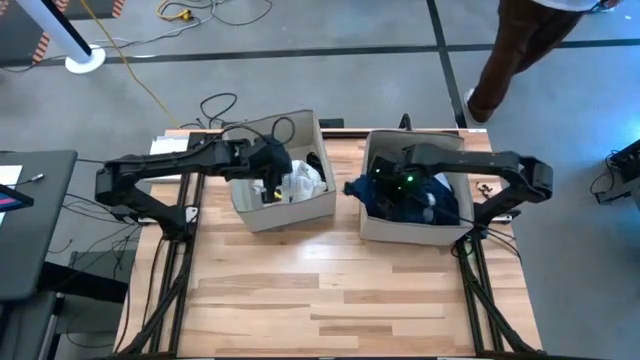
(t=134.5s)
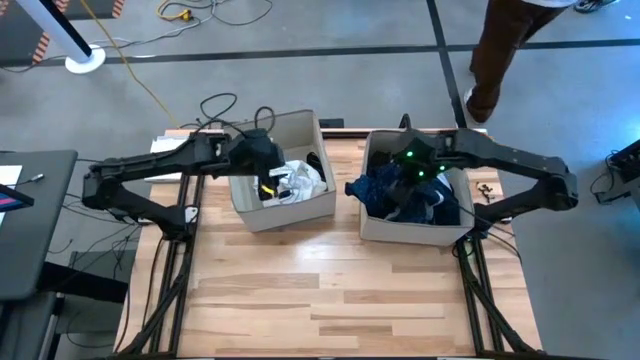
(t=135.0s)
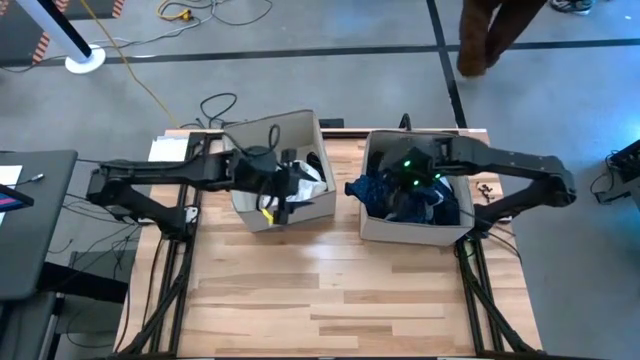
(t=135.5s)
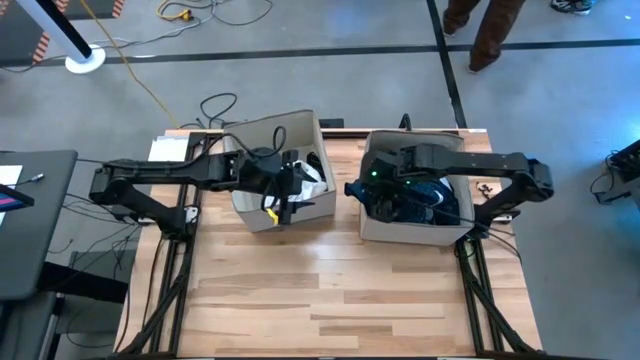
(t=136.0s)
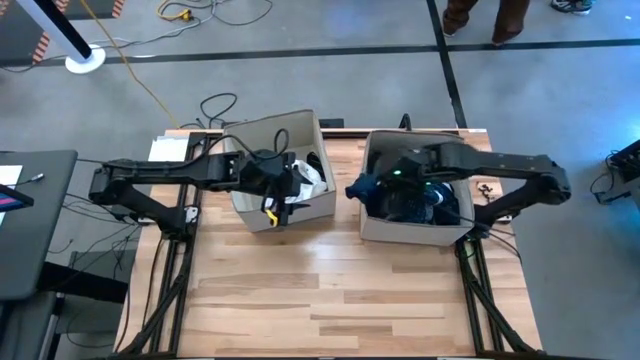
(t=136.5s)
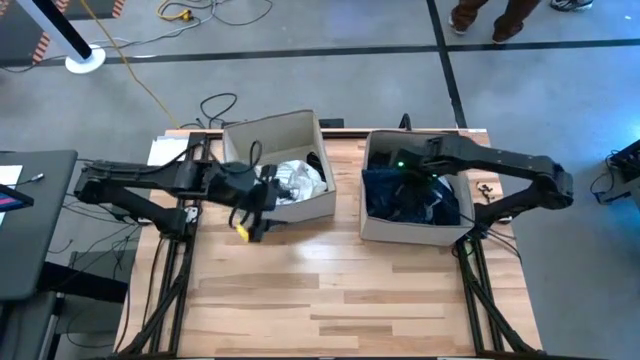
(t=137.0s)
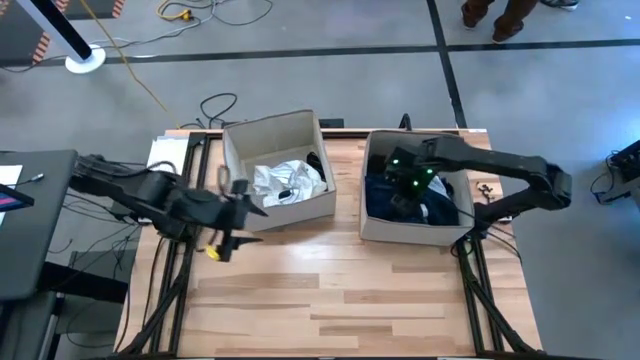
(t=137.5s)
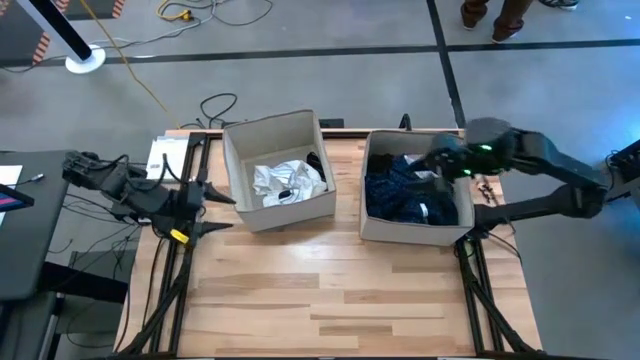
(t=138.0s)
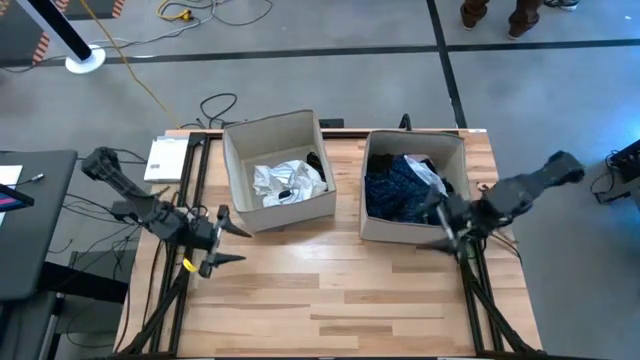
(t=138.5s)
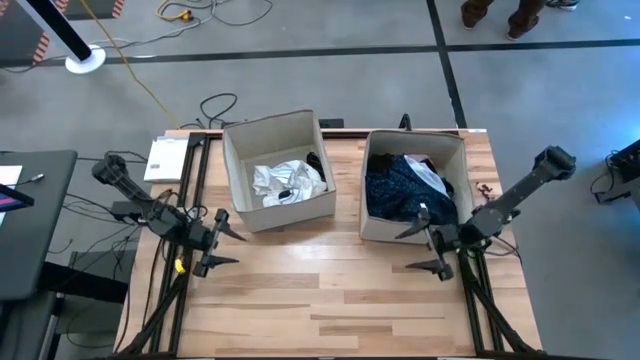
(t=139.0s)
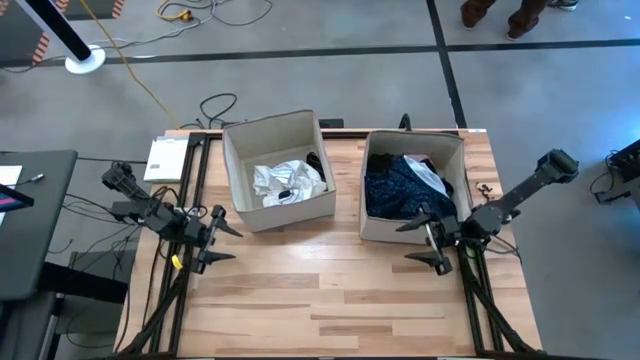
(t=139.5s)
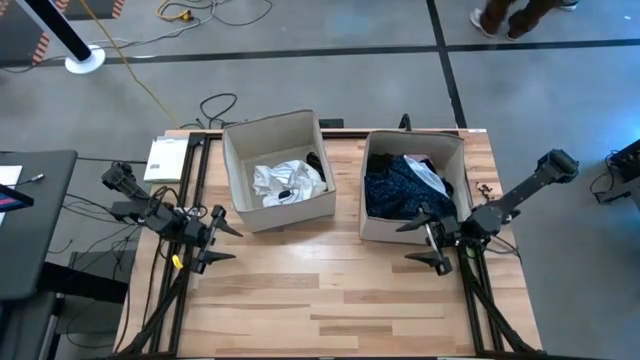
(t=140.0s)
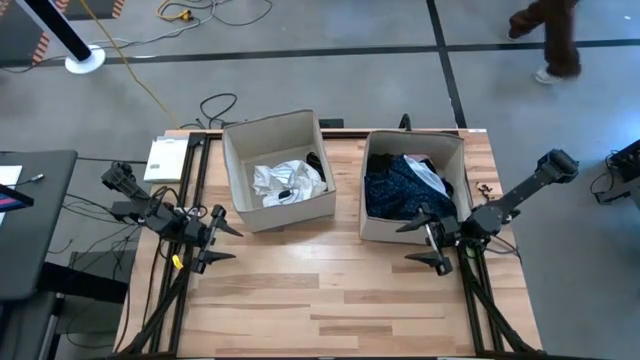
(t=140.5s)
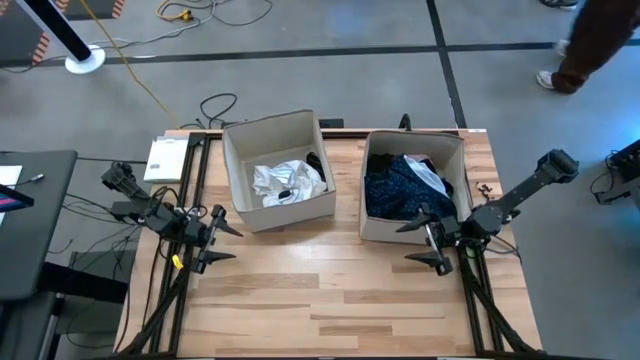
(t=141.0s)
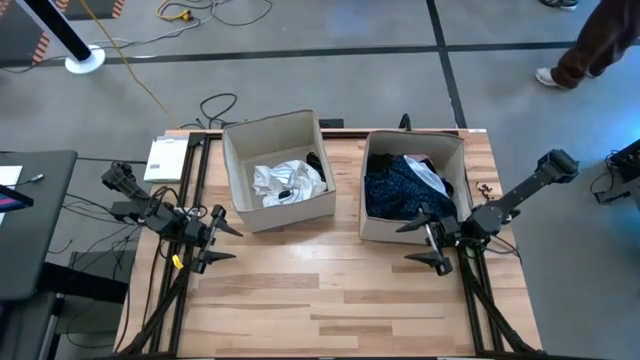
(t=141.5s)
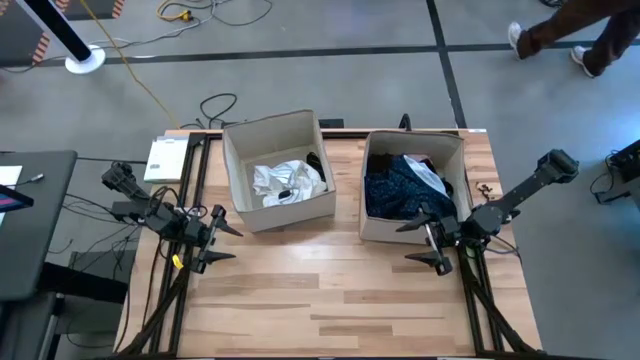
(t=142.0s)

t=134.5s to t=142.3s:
Task: Sort clothes
Return to Home Position

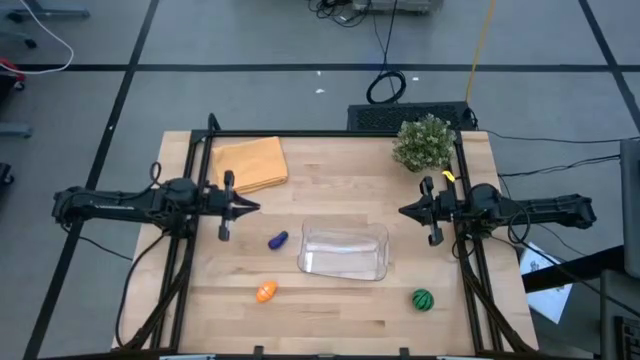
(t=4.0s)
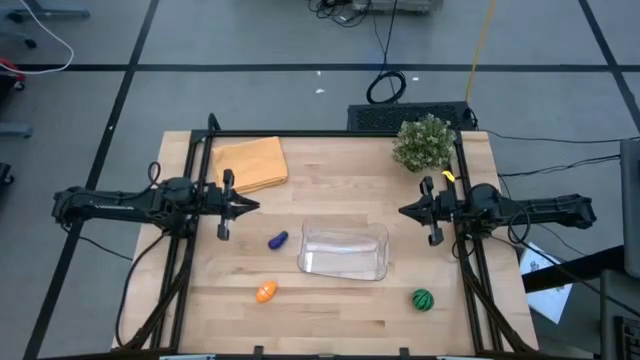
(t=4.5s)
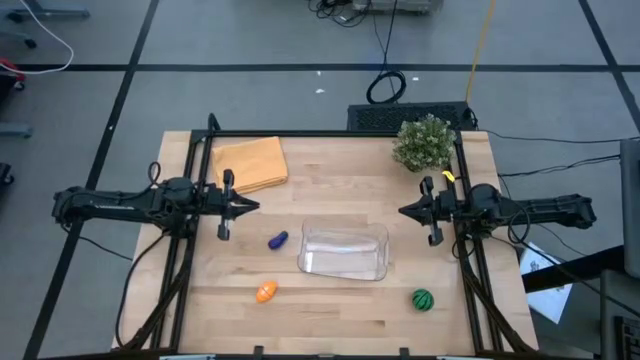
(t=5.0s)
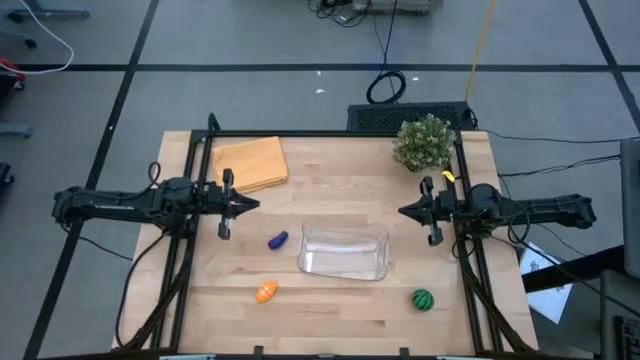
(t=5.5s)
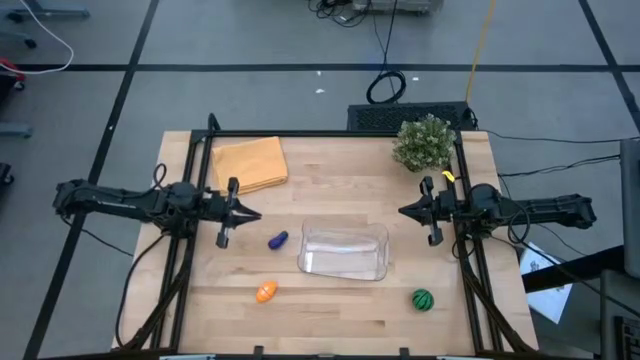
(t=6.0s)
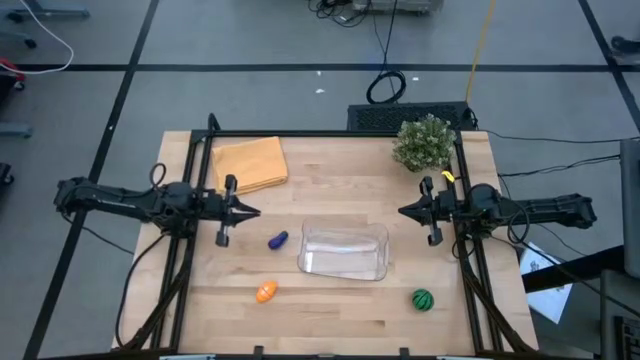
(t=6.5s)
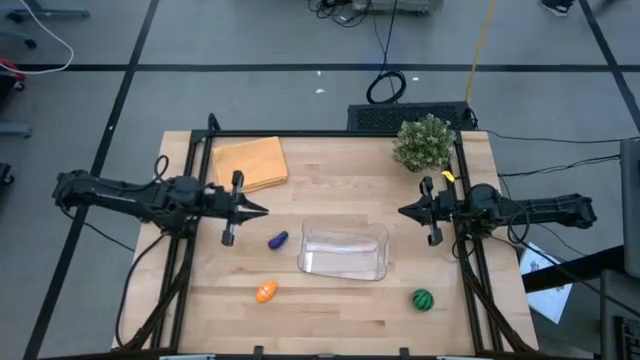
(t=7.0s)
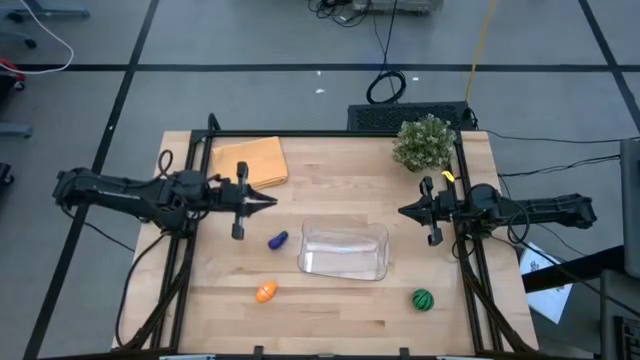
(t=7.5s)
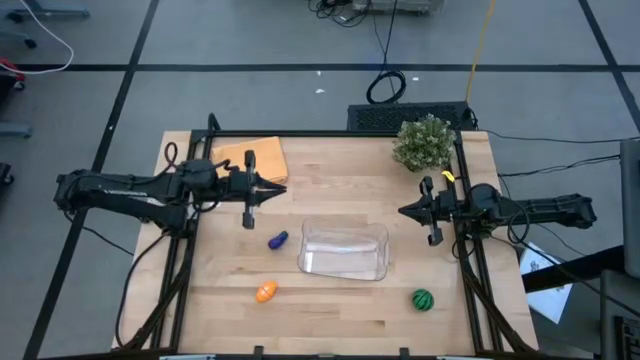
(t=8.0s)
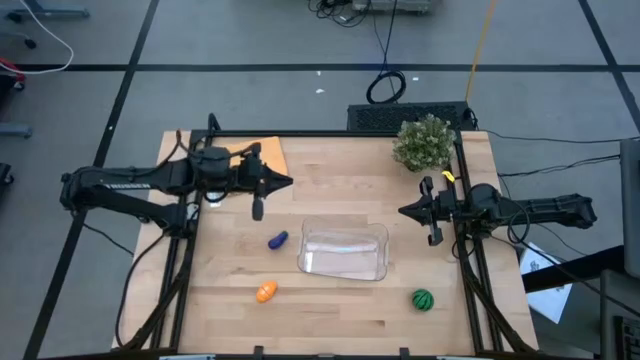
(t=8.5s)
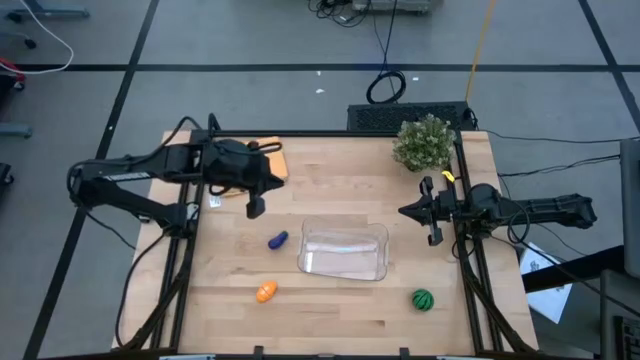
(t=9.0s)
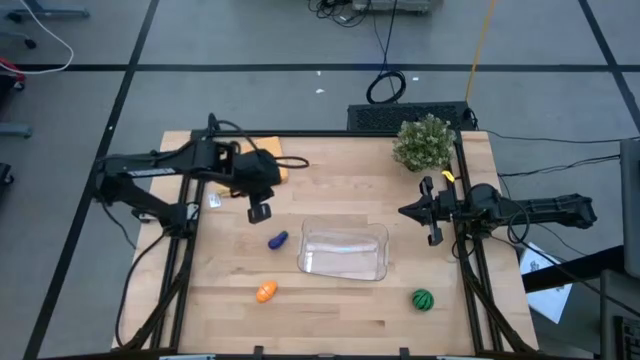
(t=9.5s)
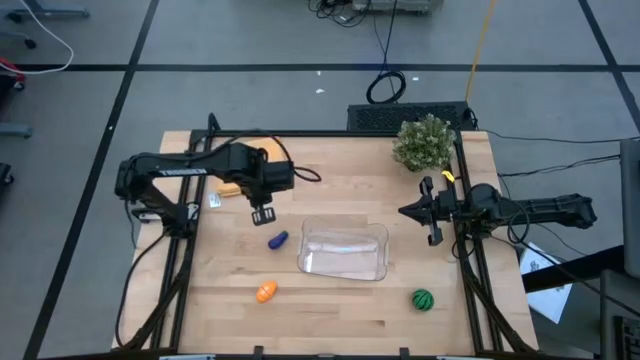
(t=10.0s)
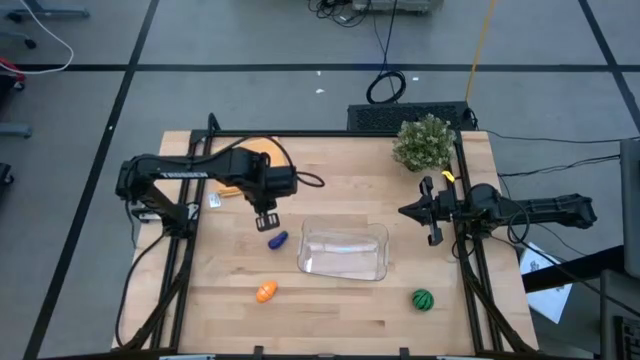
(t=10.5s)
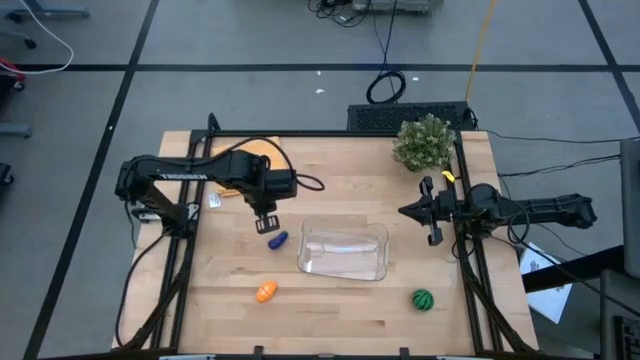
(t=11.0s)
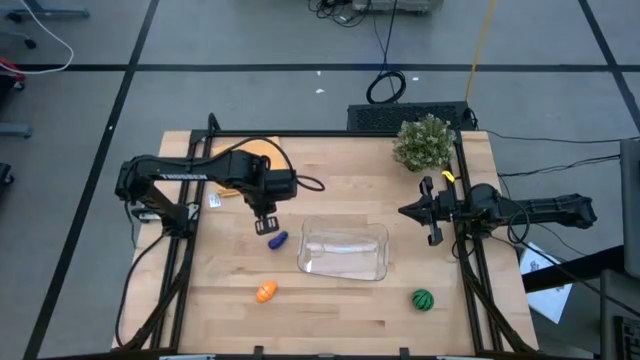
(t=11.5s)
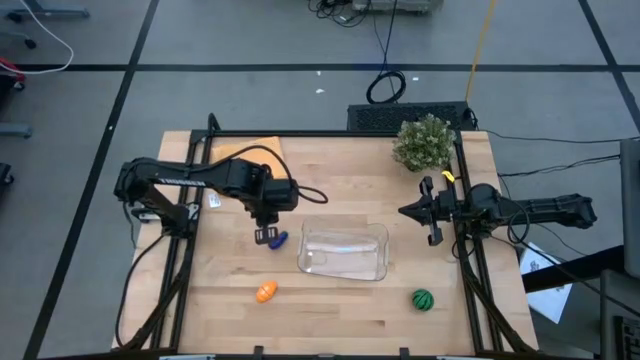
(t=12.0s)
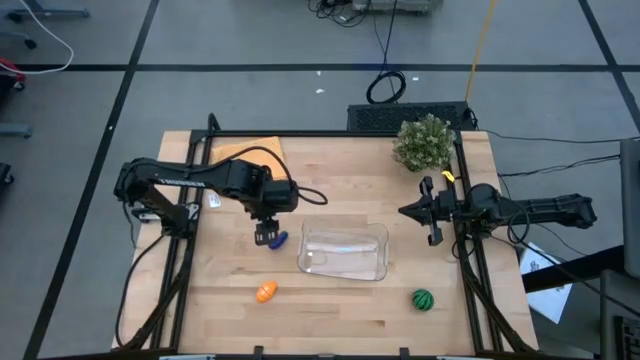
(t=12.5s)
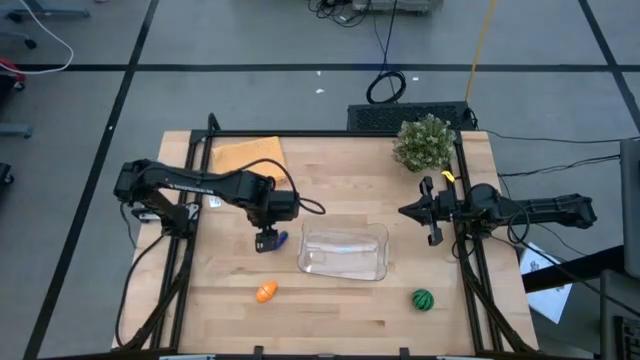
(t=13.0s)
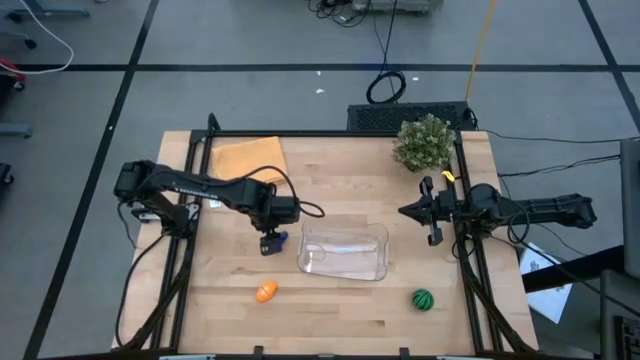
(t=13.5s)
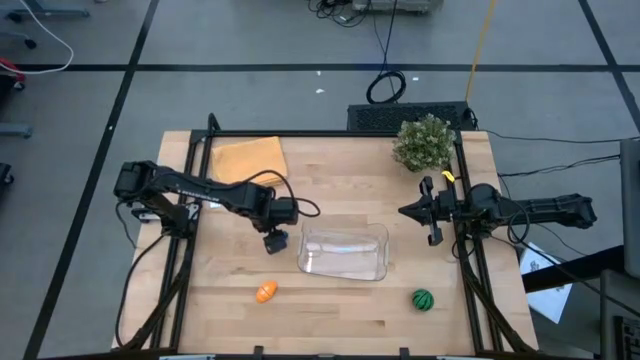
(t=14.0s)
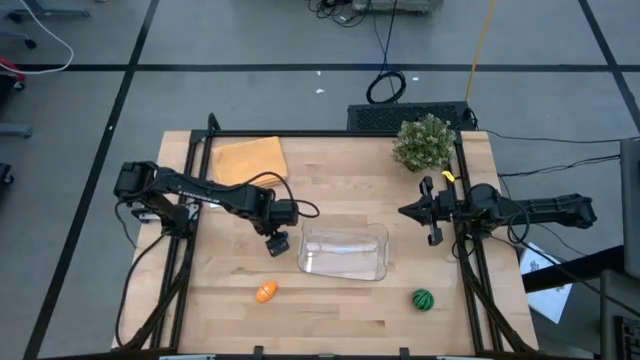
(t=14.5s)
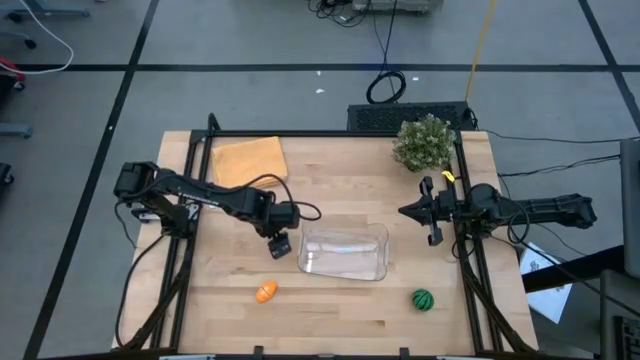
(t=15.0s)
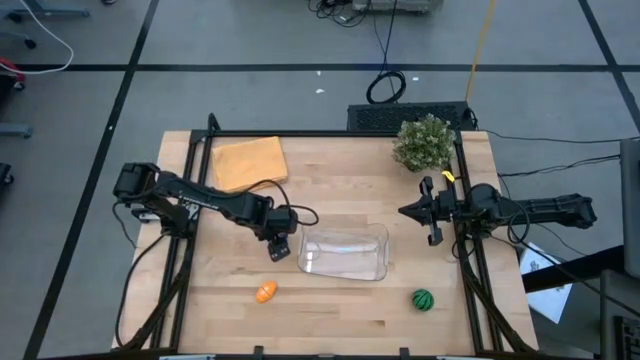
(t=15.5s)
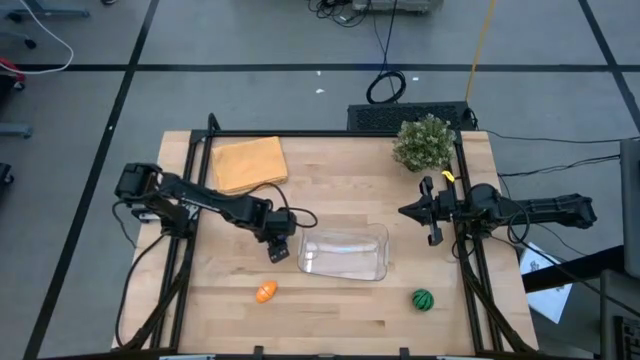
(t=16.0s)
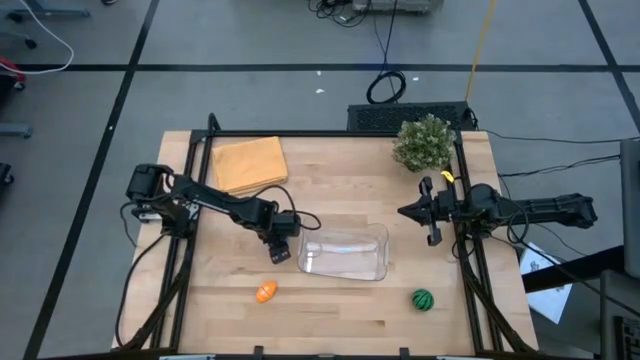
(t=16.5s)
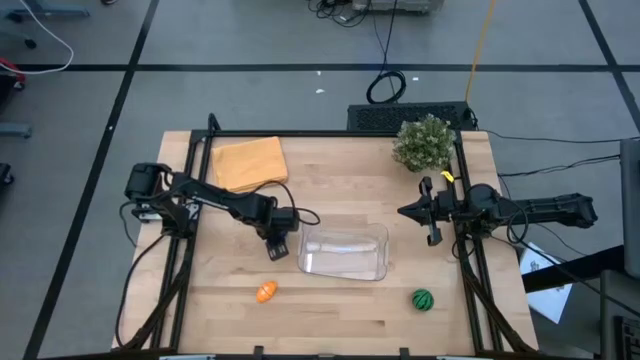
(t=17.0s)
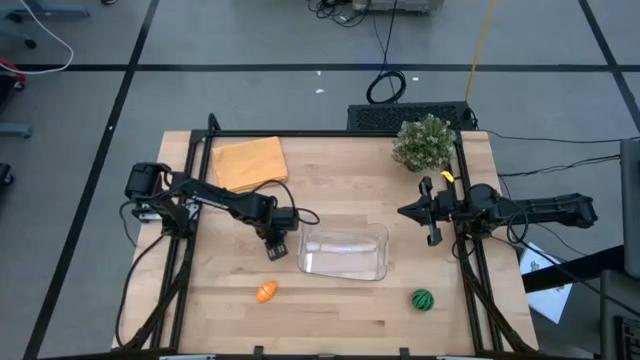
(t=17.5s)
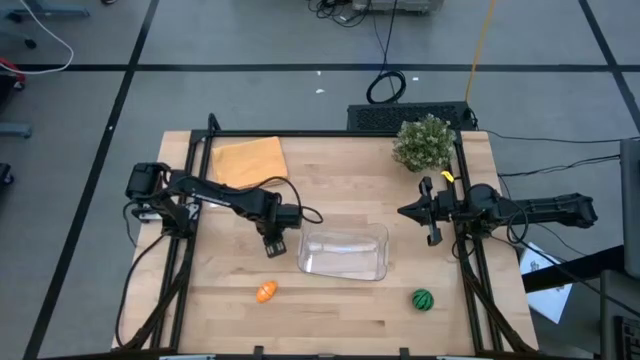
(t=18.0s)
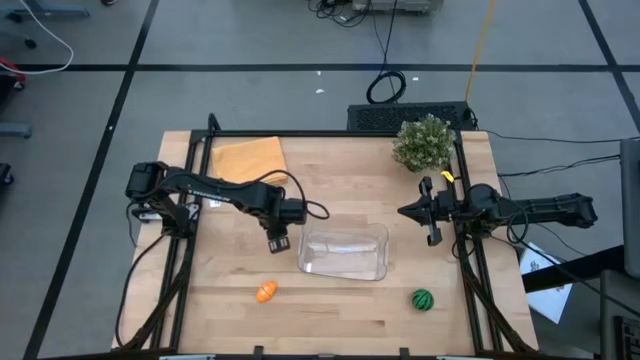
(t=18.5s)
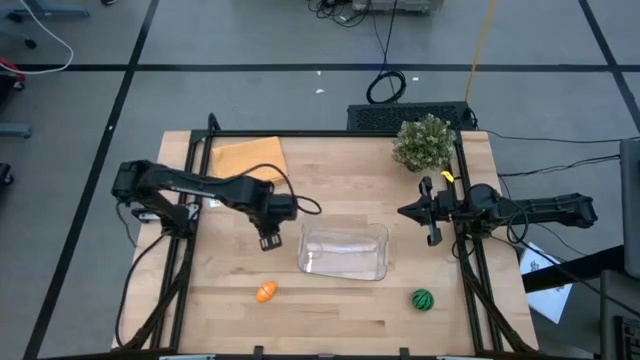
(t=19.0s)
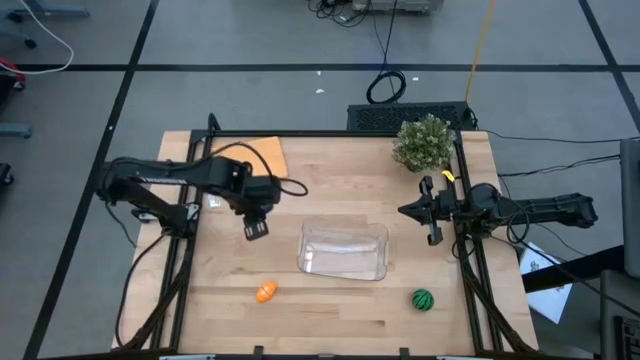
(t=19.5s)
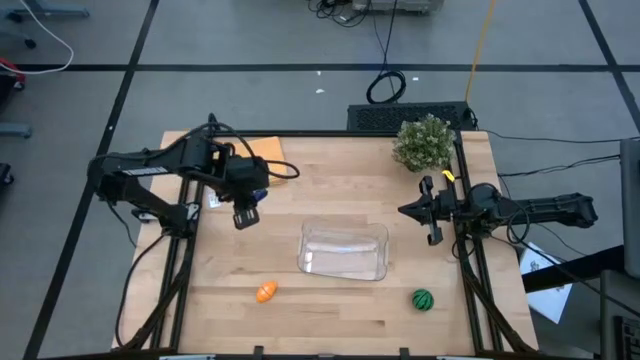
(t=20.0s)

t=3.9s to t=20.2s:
Task: Pick and placing Produce into tupperware
Put the purple eggplant into the transparent bin
